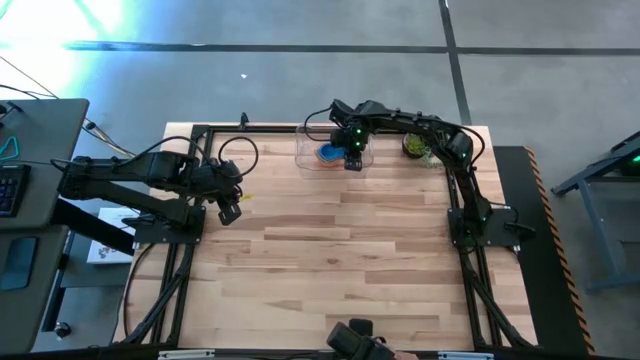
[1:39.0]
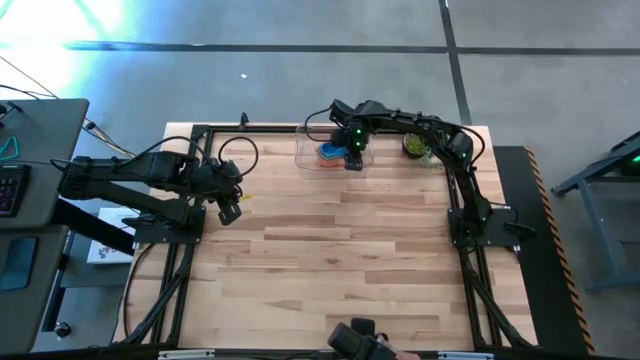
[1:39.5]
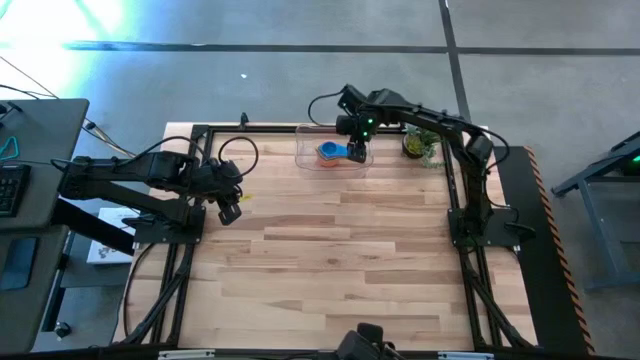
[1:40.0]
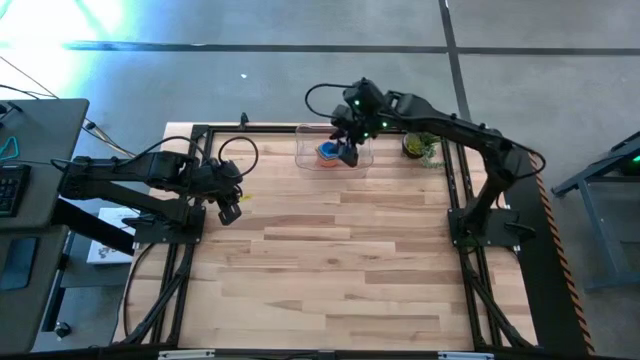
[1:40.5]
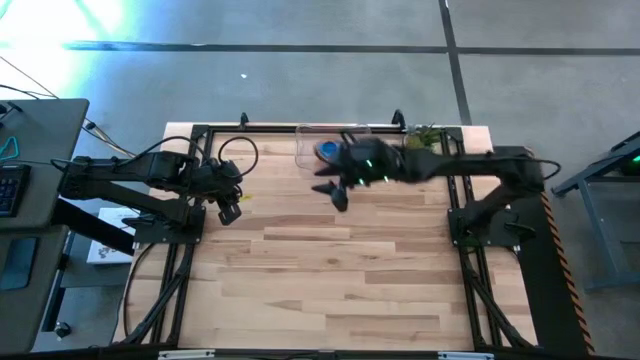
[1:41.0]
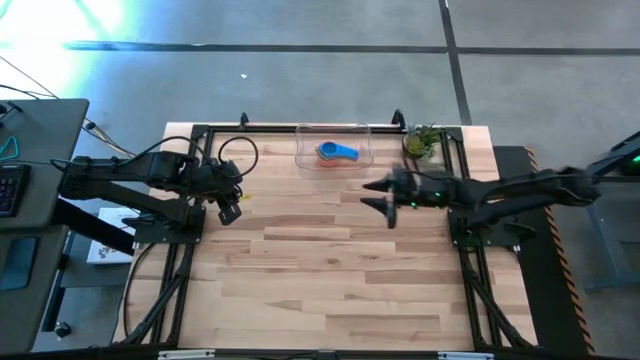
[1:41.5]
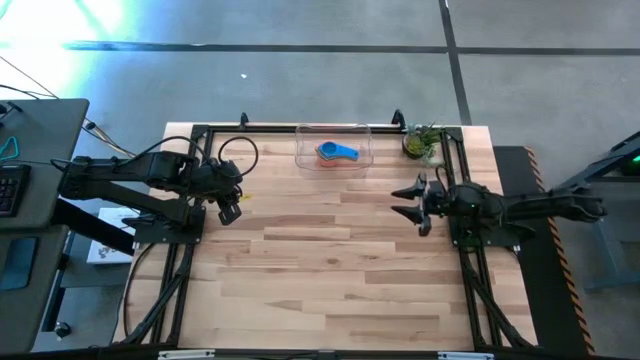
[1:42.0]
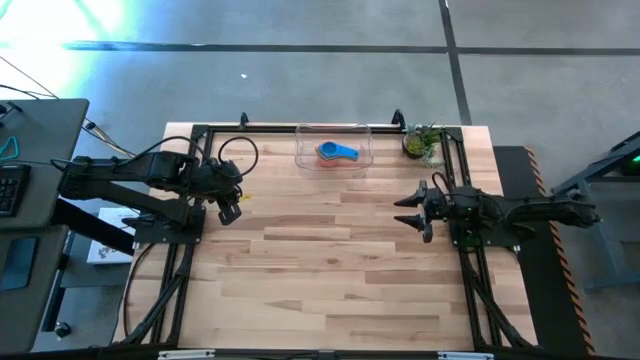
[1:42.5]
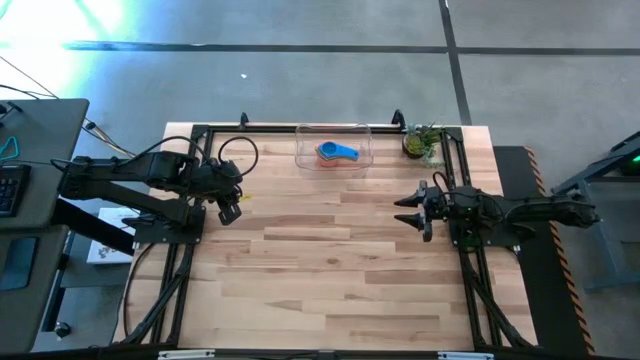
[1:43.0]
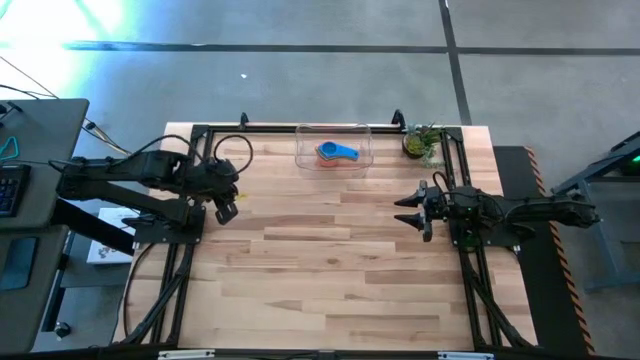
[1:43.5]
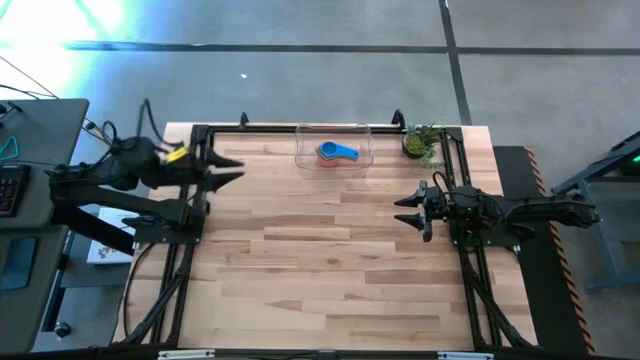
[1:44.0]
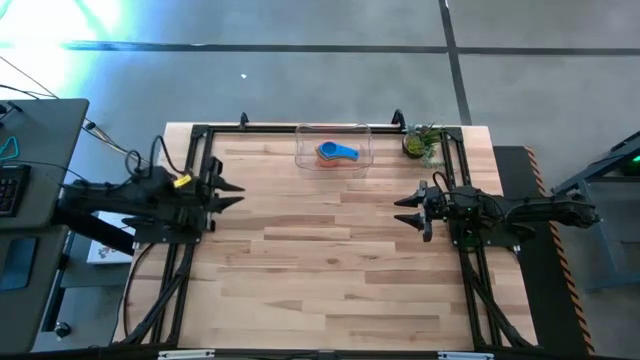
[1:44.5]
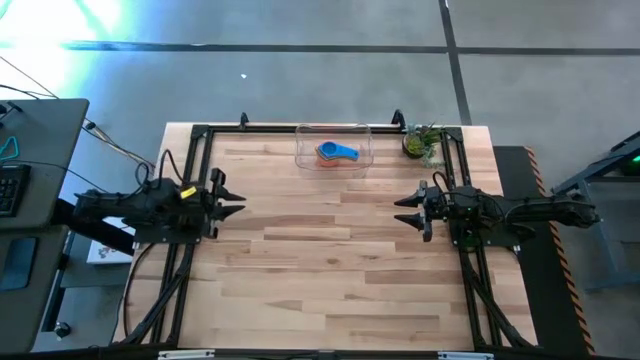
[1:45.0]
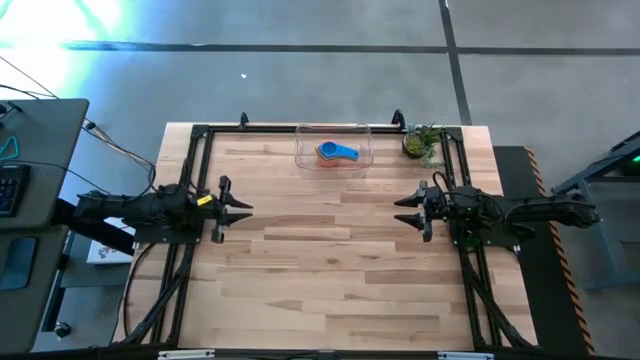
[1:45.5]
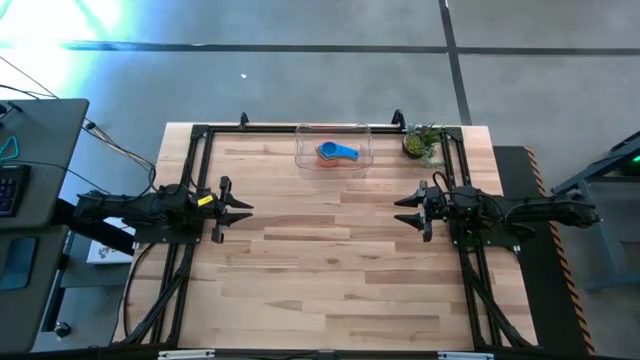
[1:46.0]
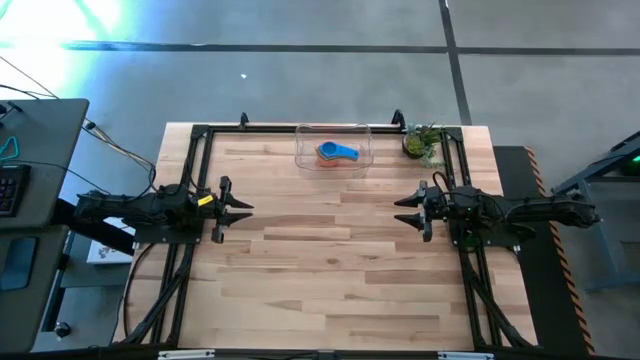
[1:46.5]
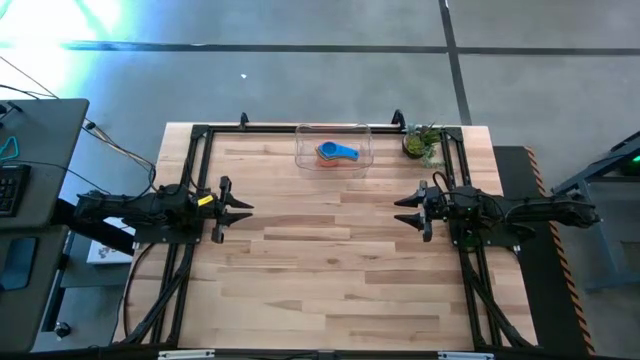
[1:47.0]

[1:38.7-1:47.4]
Task: Nest measuring cups in basket
Return to Home Position

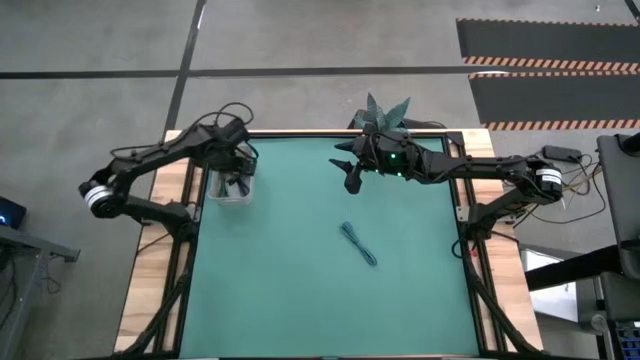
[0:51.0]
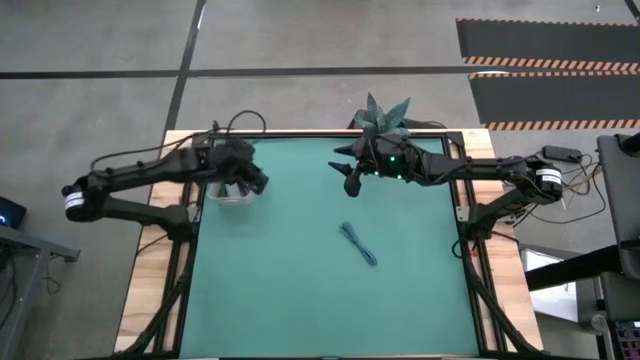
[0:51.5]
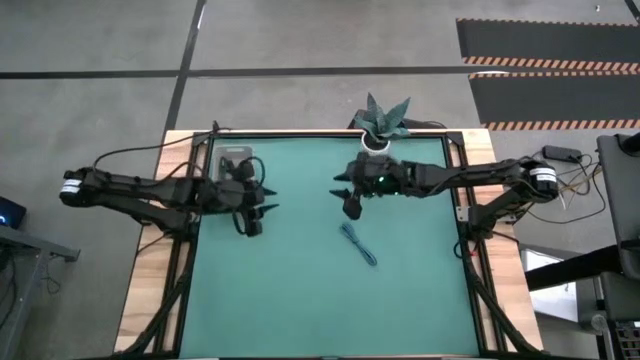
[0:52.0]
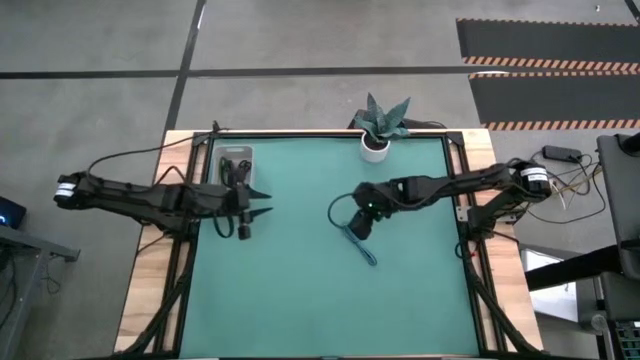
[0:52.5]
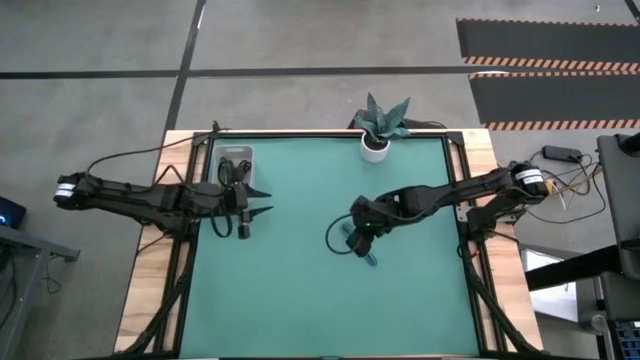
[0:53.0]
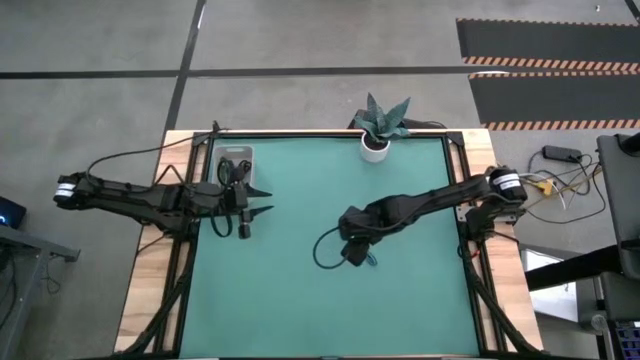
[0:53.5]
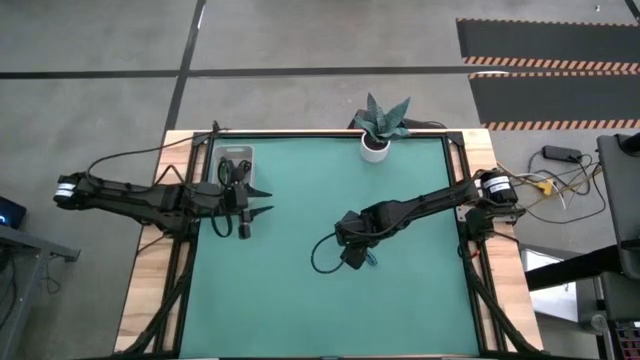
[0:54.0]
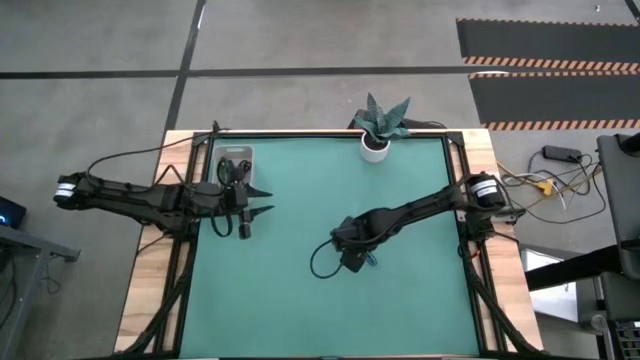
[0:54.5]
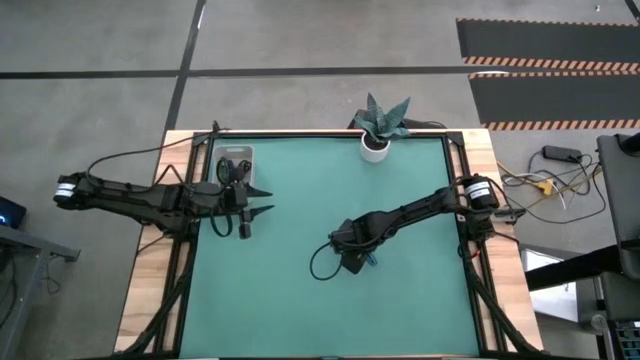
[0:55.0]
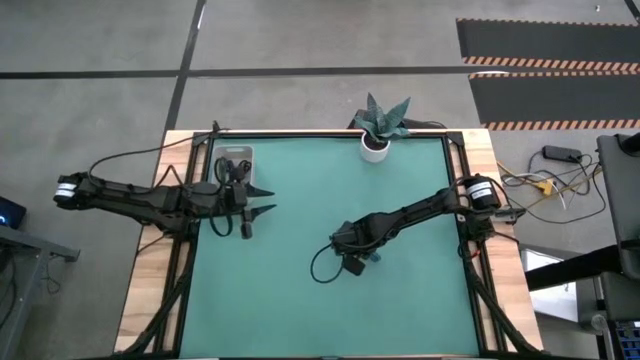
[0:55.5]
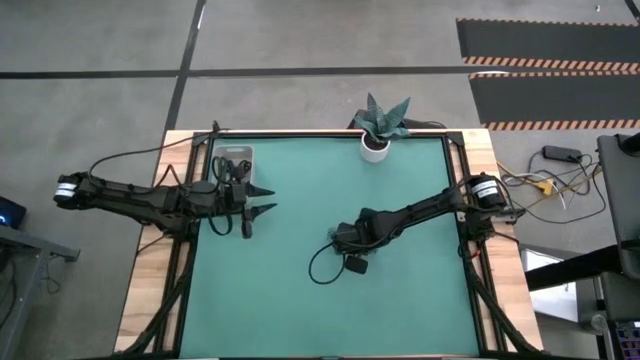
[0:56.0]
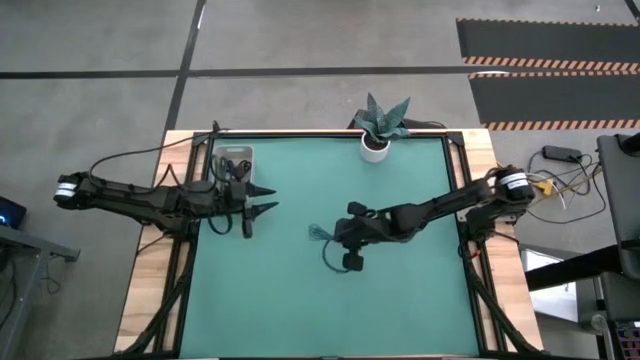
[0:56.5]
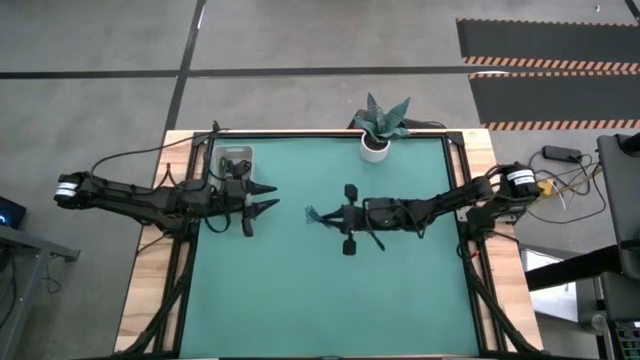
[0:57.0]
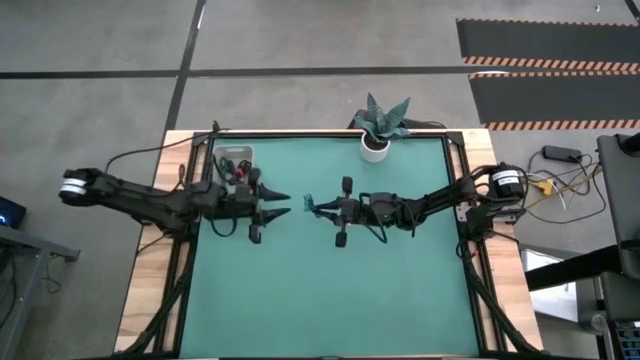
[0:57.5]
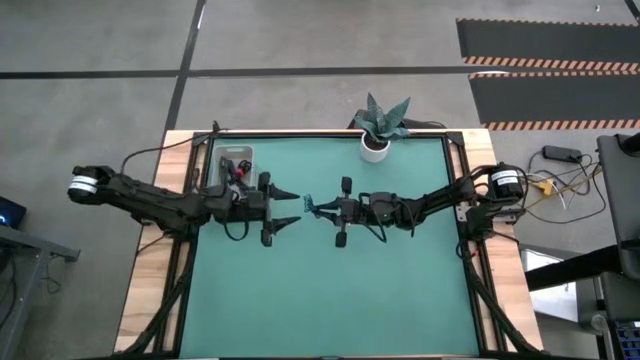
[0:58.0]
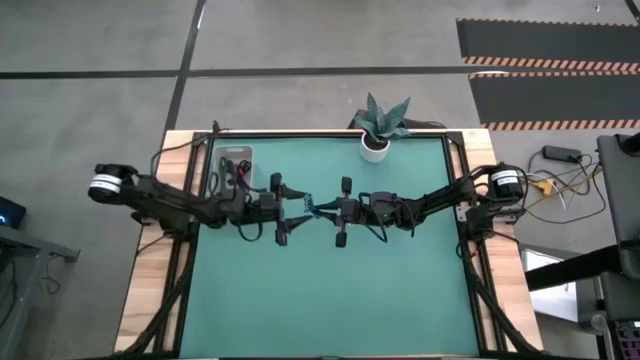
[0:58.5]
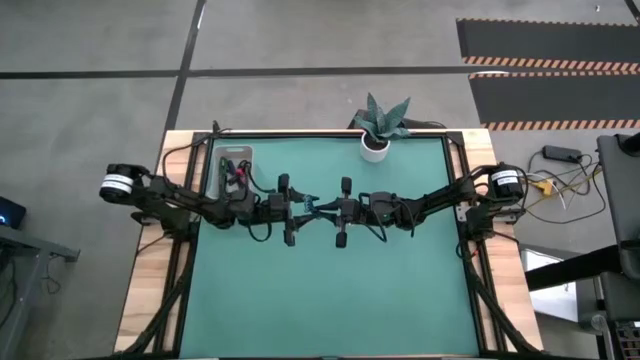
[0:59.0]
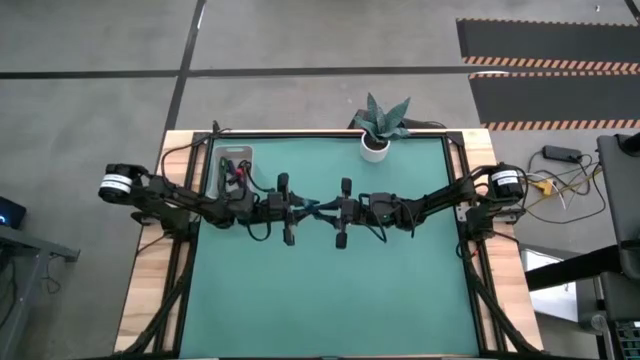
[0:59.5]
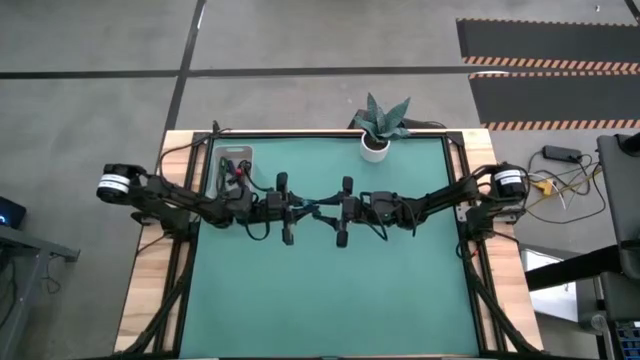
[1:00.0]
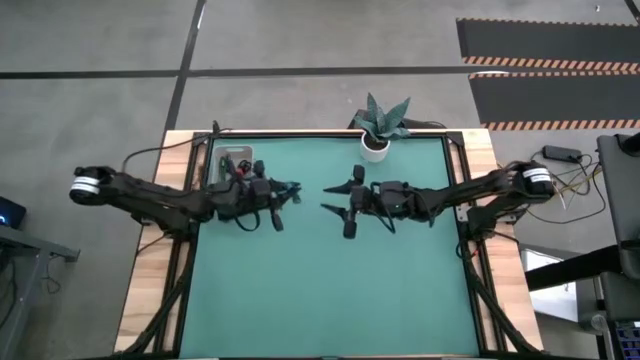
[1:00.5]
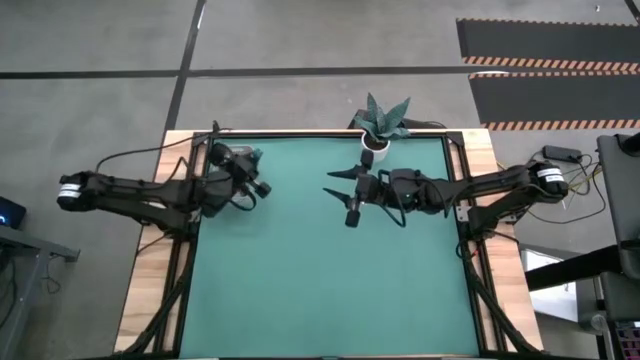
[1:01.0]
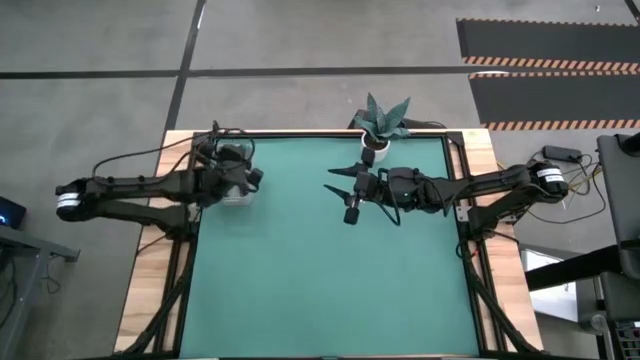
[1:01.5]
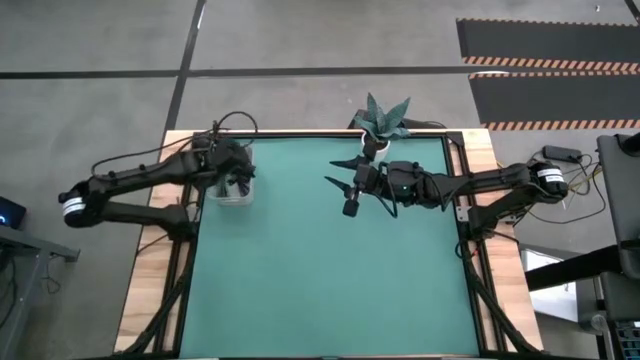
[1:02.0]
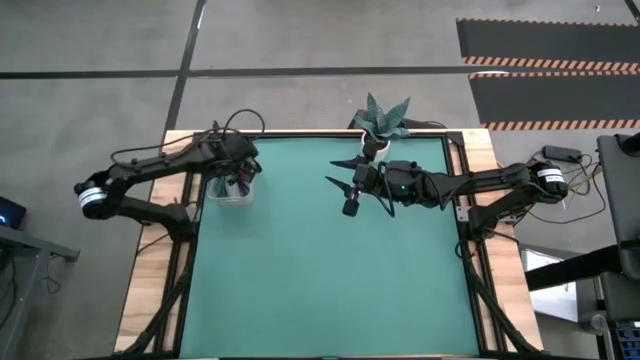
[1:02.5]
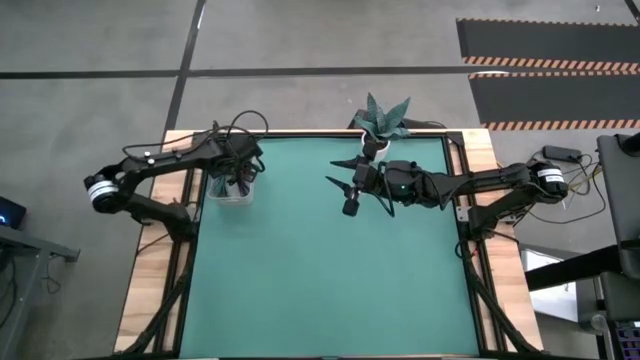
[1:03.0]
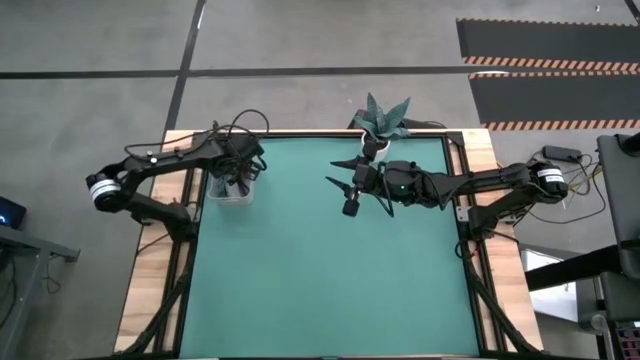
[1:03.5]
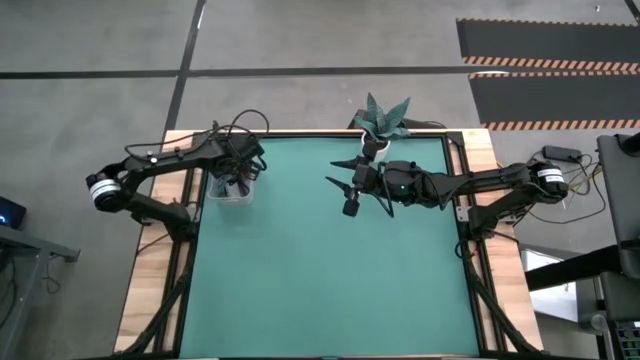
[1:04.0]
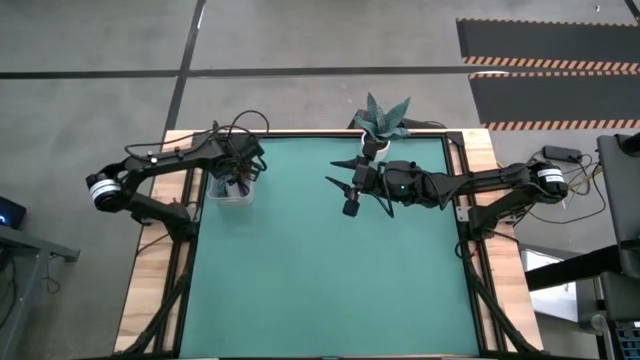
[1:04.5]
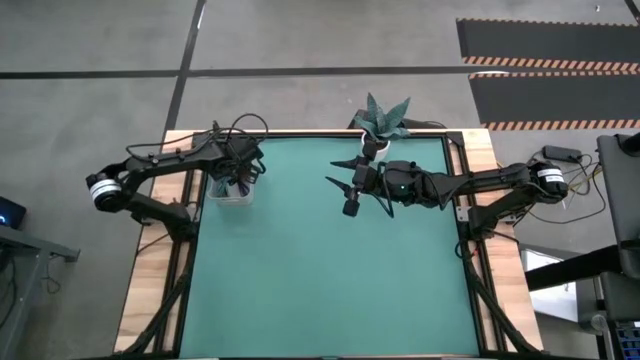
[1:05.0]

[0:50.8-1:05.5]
Task: Pick and place USB-C Cables
Put the blue usb cable into the gray bin
